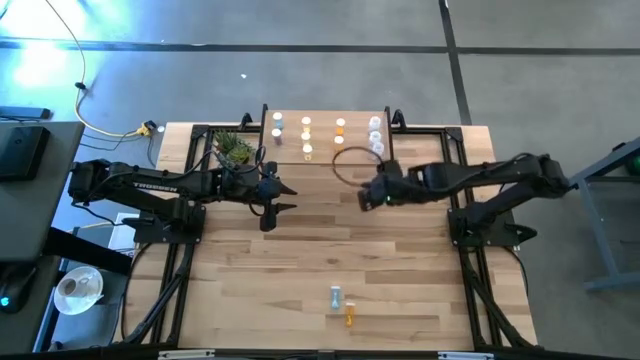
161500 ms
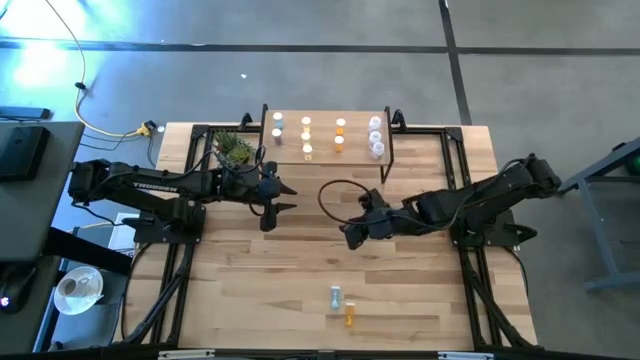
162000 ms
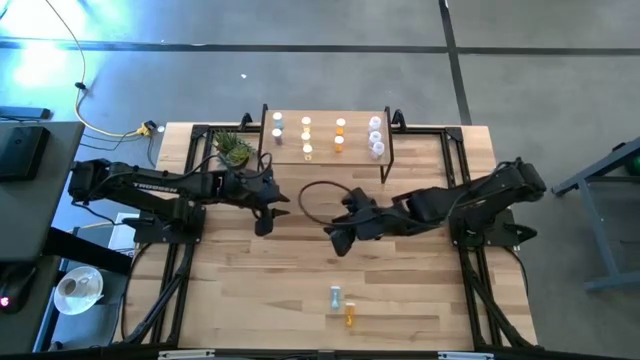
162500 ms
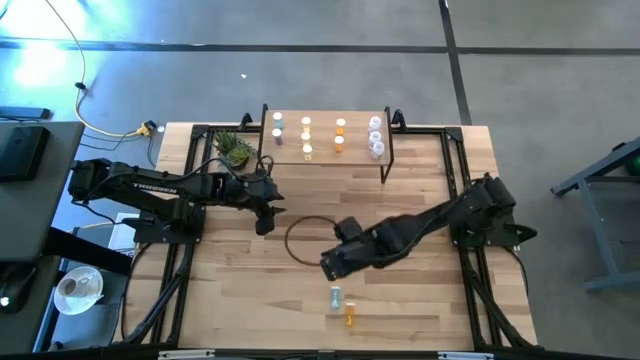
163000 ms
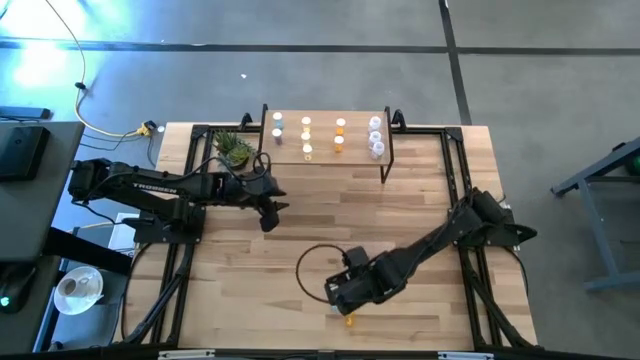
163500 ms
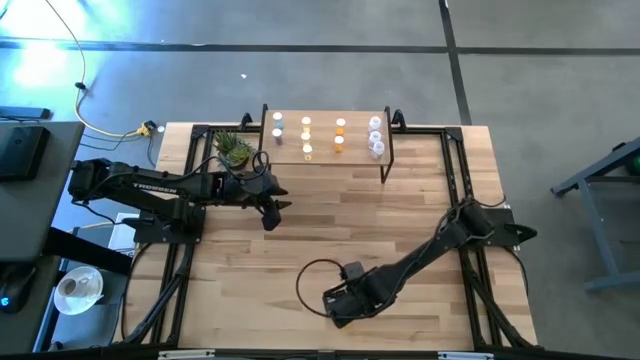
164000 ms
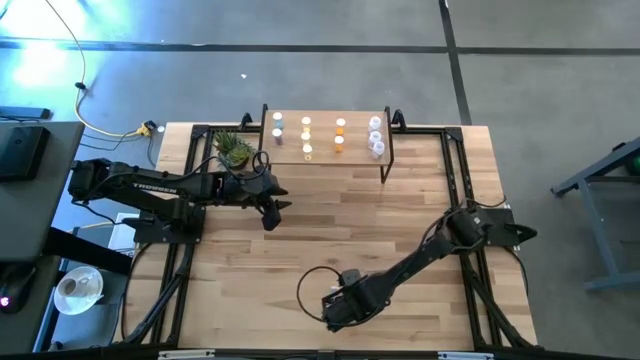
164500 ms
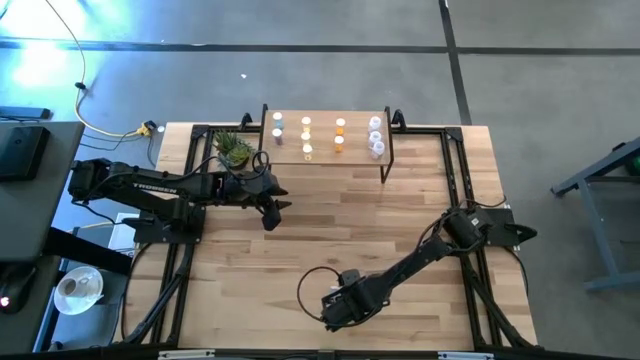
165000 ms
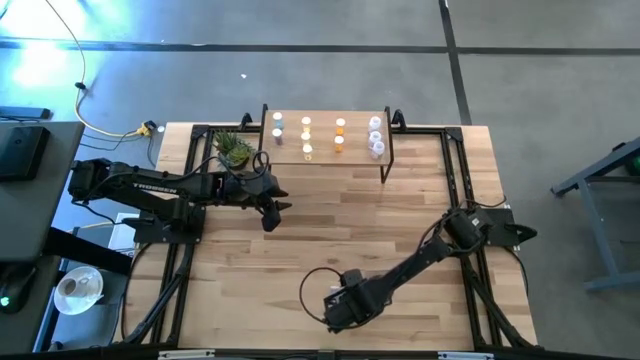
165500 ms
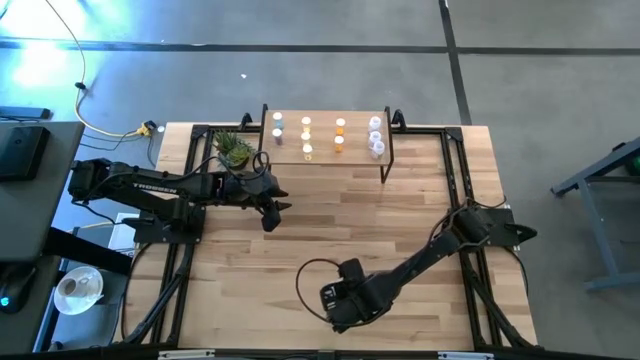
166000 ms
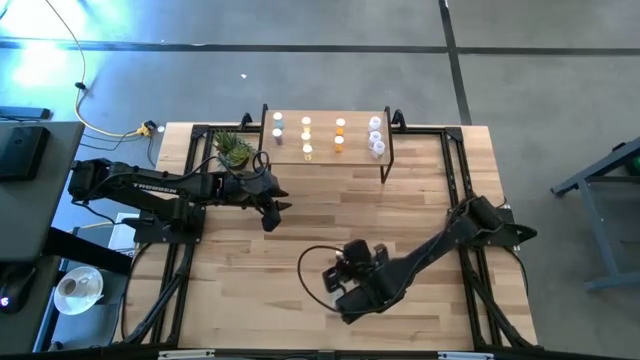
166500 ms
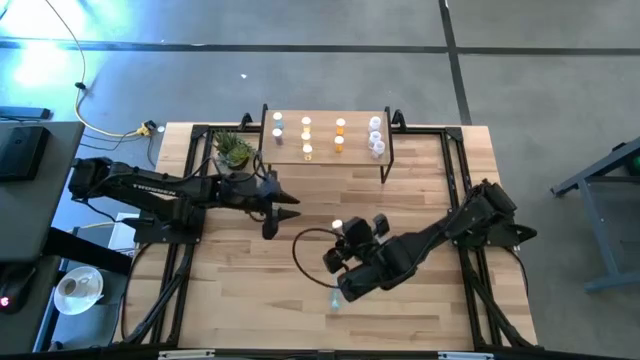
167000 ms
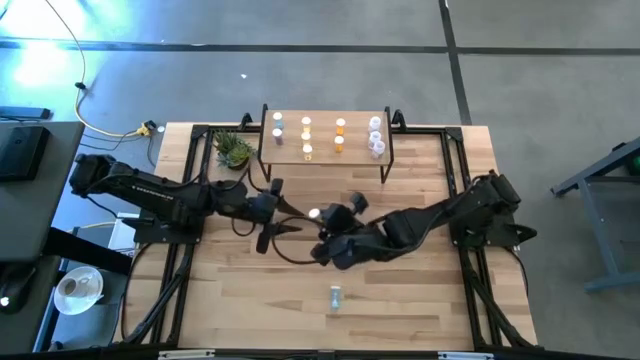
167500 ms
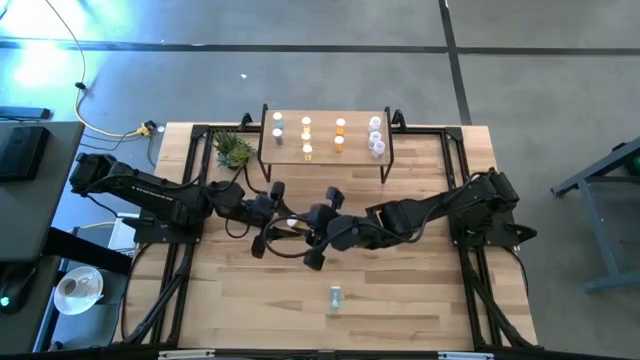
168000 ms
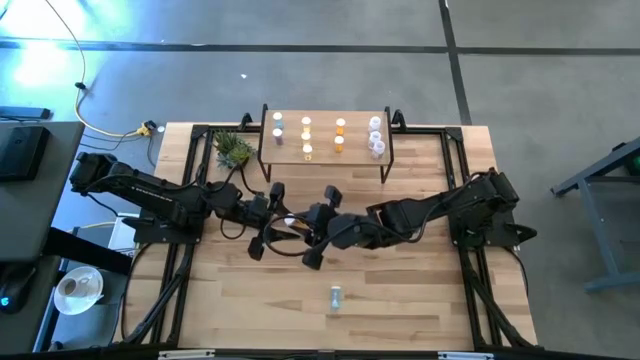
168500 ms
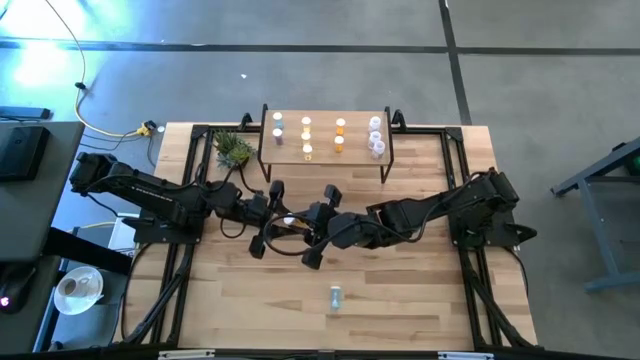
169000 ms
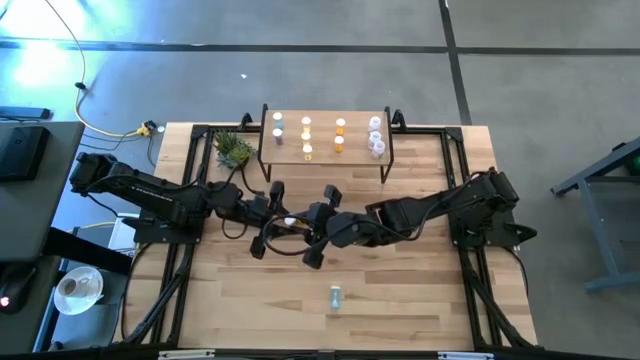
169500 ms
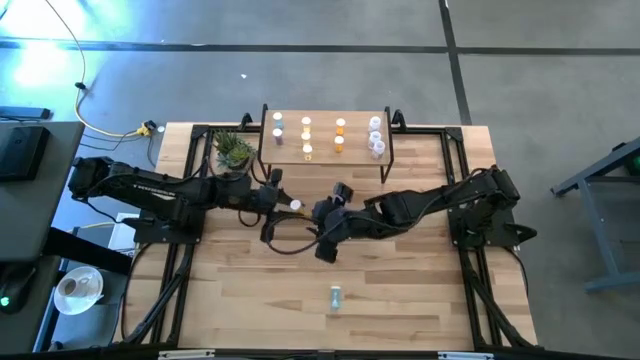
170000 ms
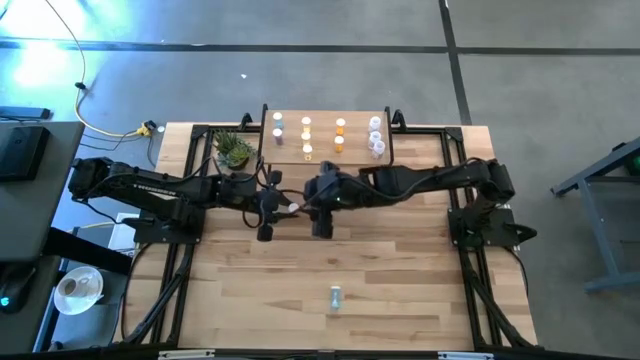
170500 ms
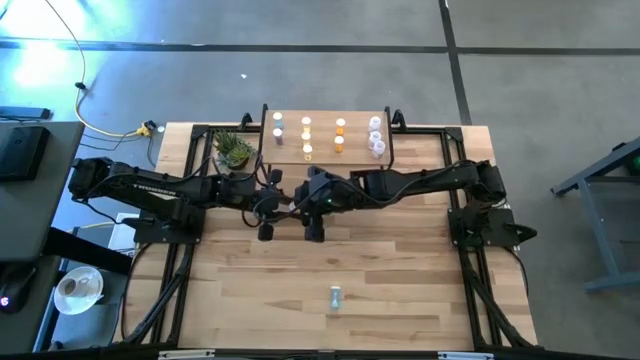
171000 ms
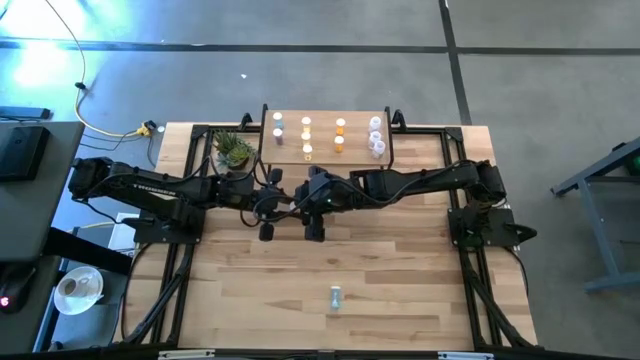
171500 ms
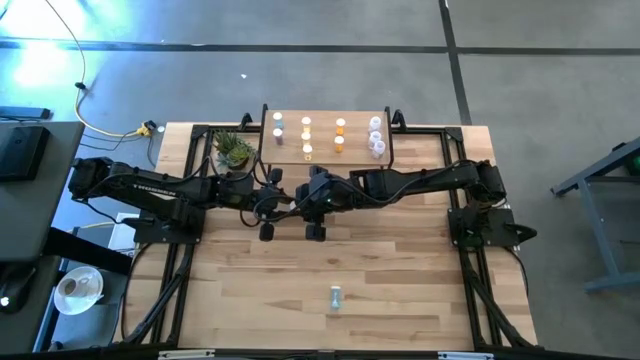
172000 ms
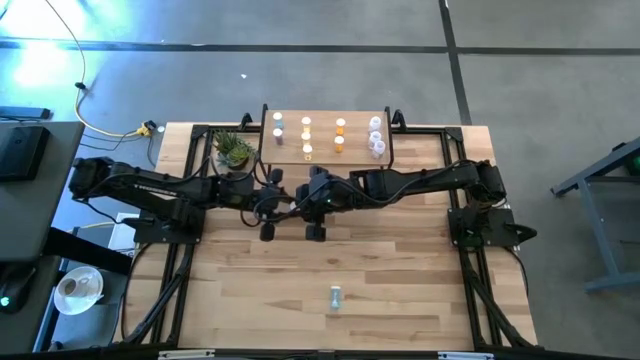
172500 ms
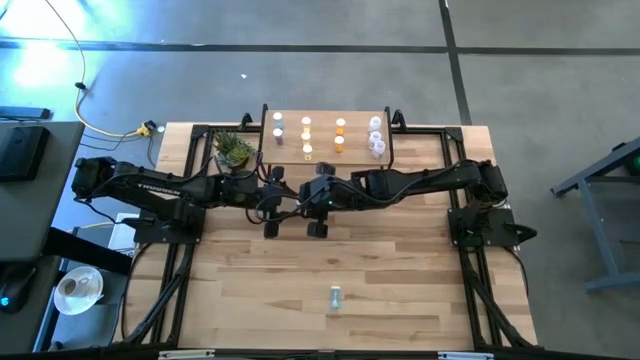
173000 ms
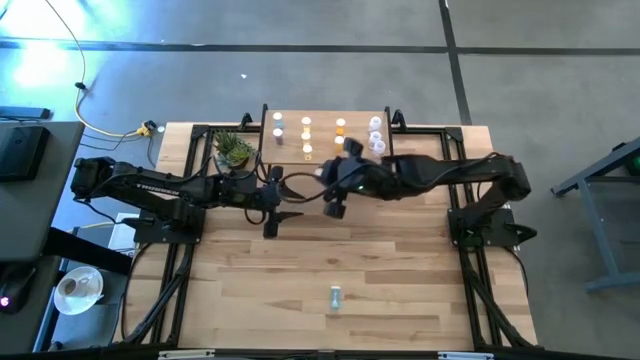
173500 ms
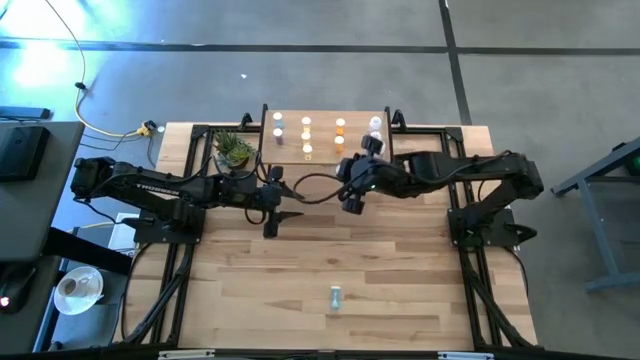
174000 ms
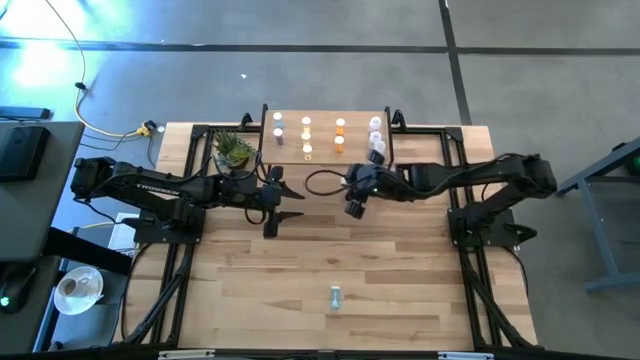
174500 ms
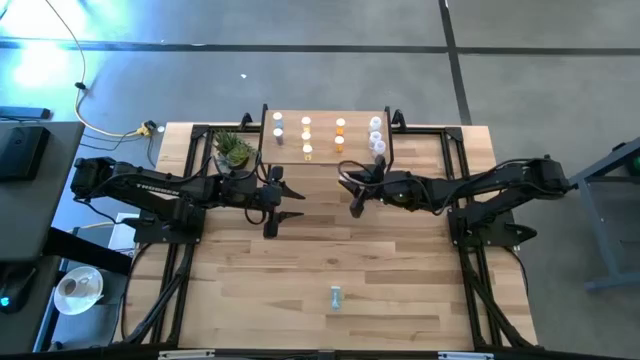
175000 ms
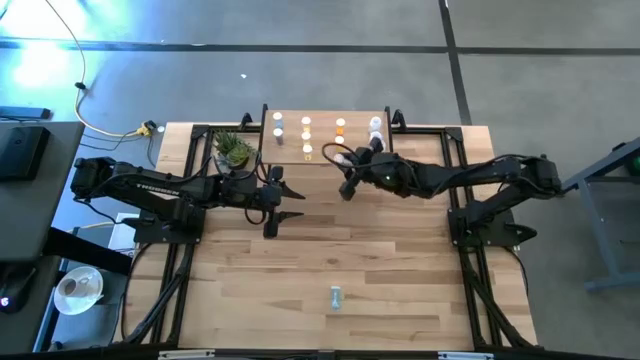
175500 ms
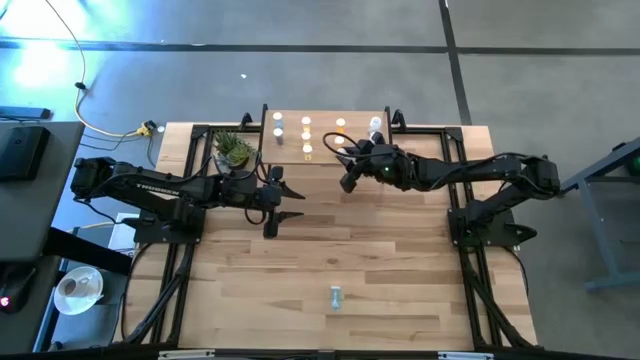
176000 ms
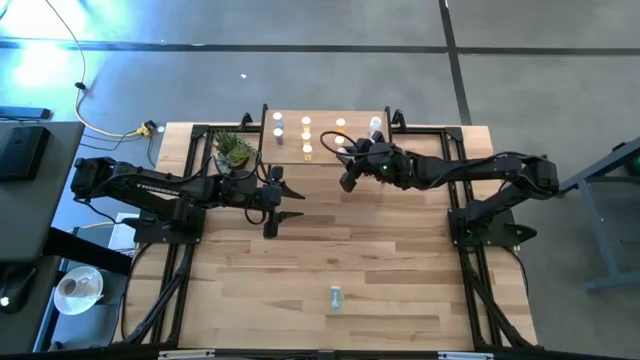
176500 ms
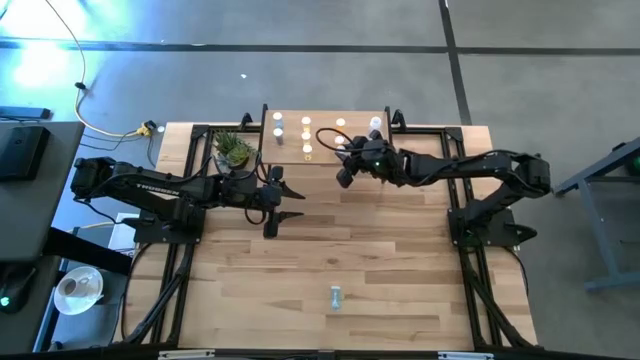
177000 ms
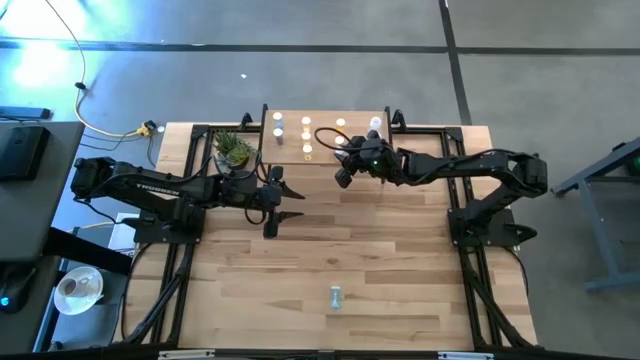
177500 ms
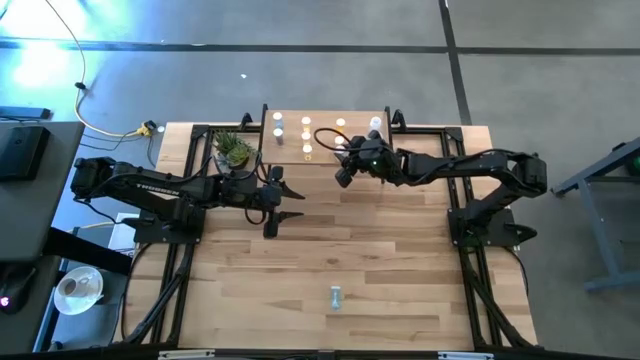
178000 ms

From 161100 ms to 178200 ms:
Task: Pick and place medicine bottles onto shelf by color
Put the orange pill bottle on the shelf aligned with the orange pill bottles

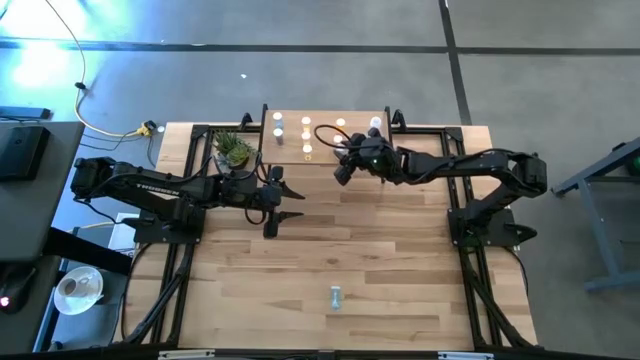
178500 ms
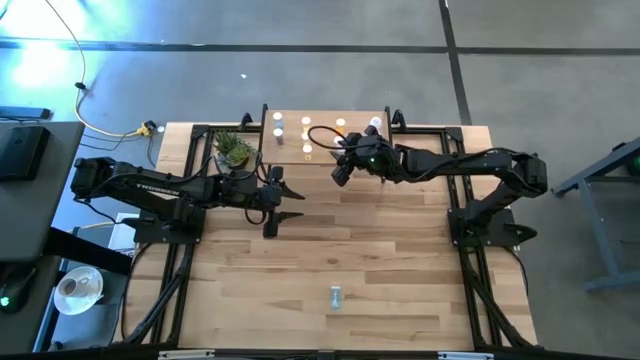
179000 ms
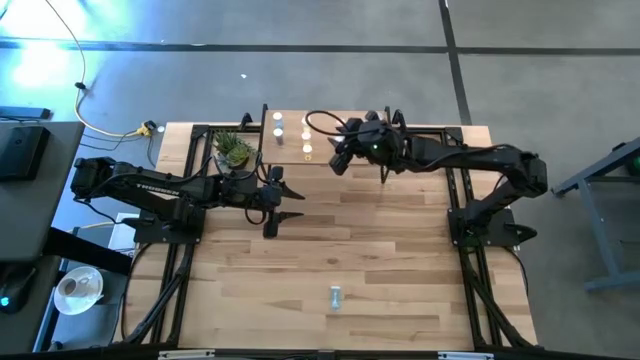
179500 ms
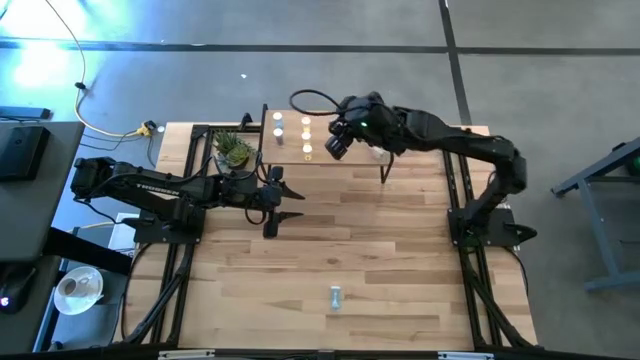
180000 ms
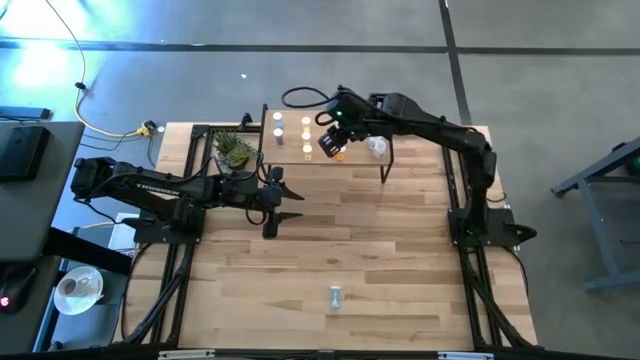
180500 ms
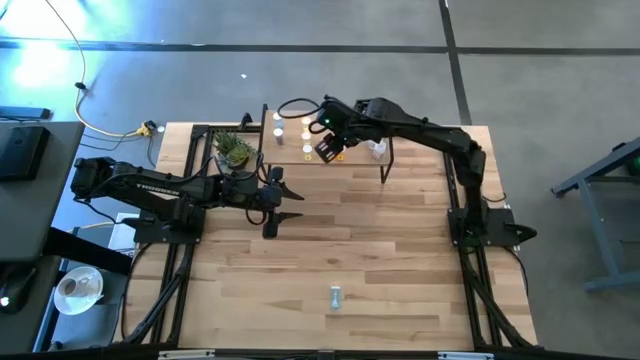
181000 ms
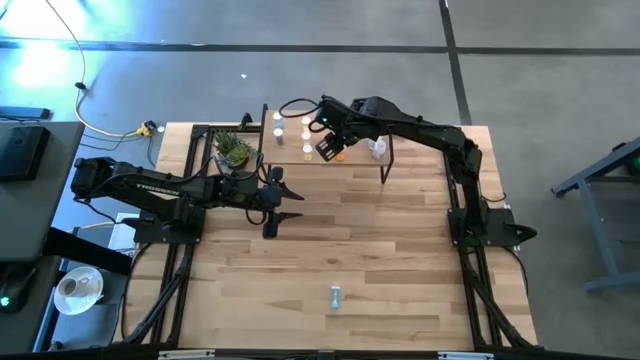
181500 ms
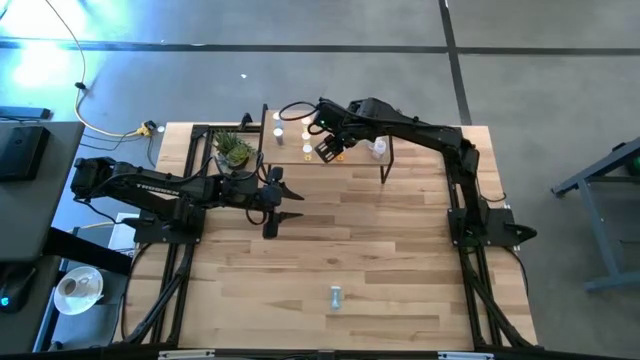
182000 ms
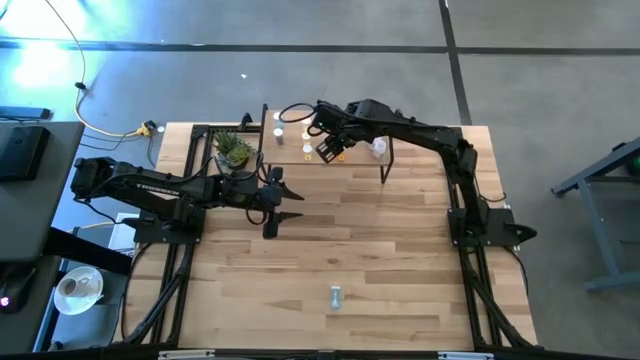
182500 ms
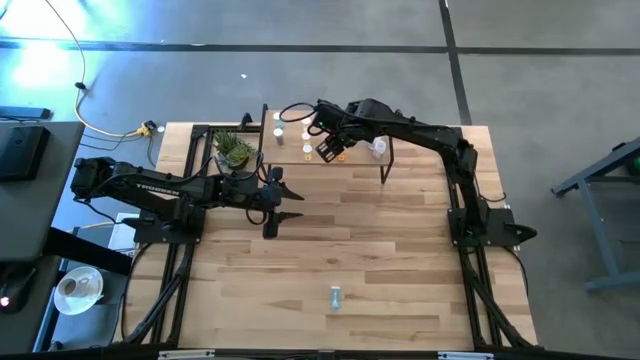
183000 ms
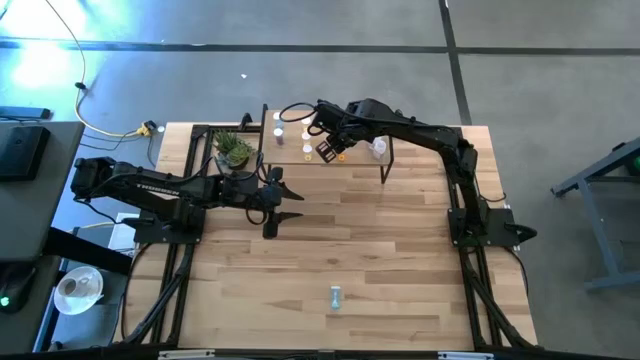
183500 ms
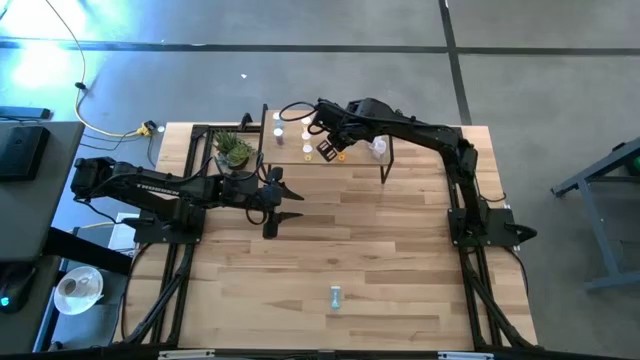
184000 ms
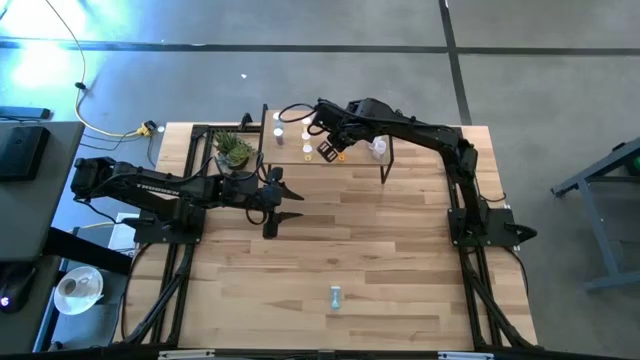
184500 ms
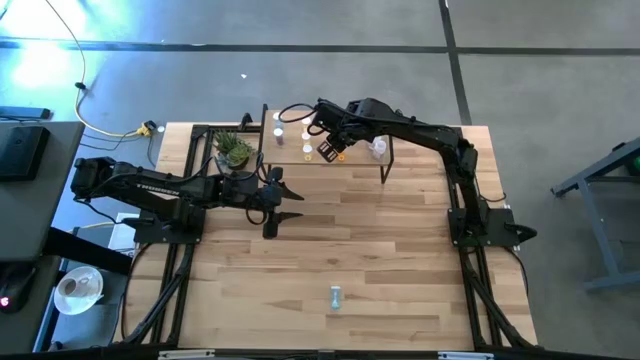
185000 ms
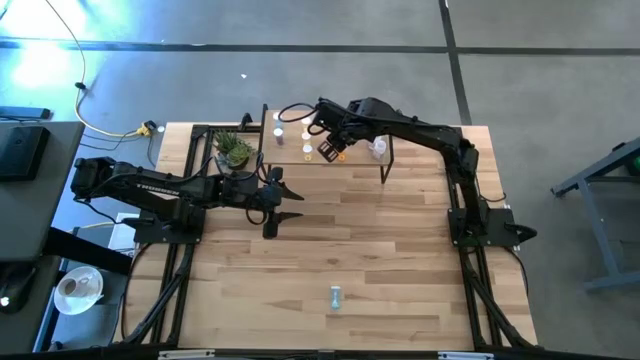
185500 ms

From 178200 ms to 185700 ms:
Adjust the orange pill bottle on the shelf
